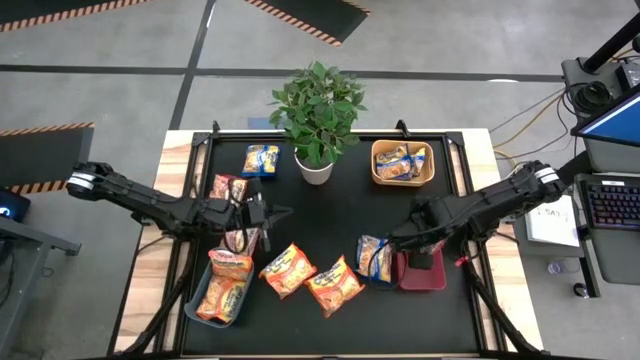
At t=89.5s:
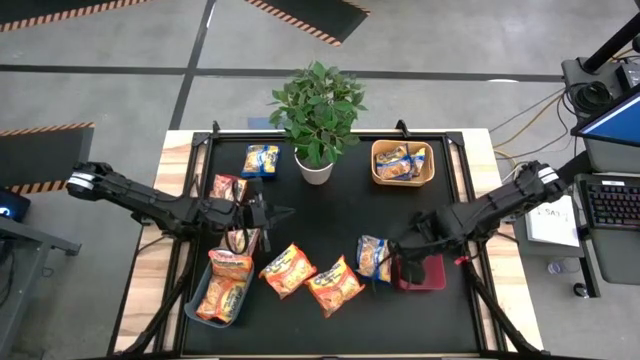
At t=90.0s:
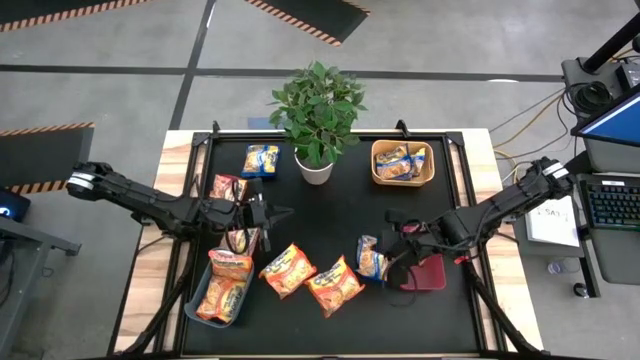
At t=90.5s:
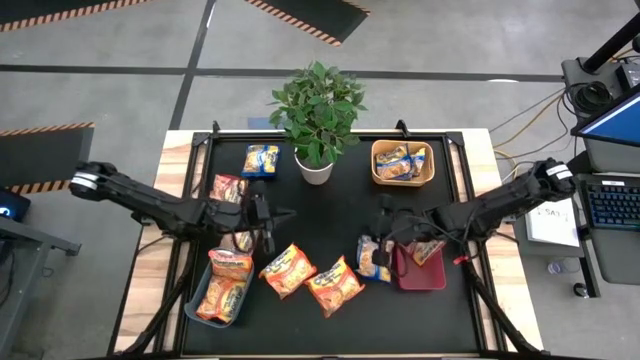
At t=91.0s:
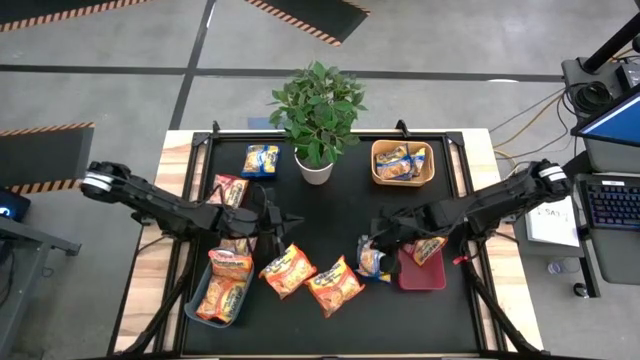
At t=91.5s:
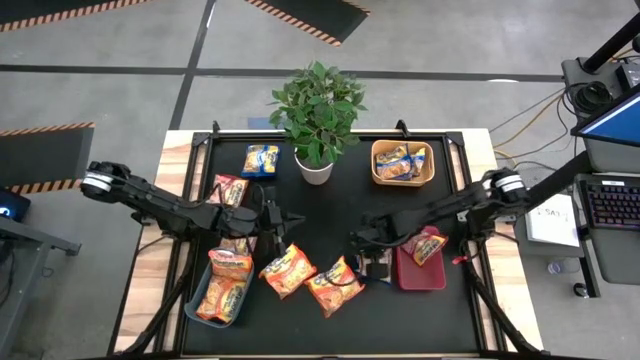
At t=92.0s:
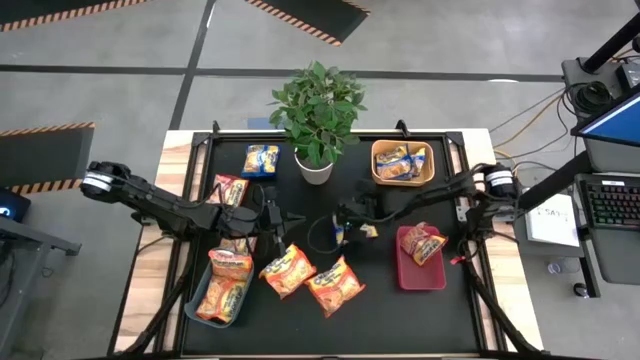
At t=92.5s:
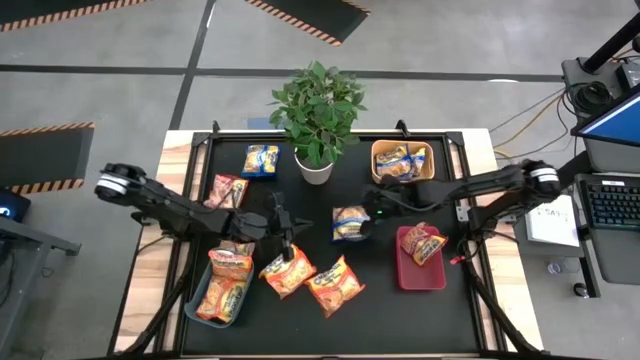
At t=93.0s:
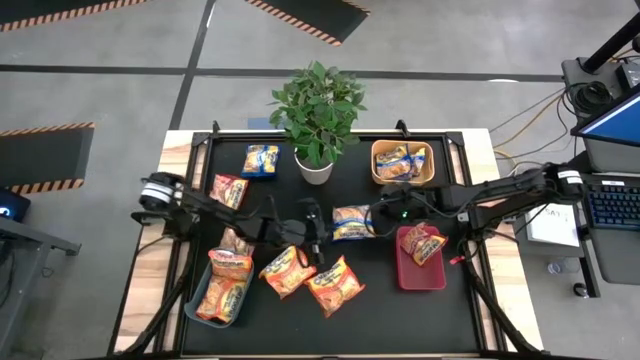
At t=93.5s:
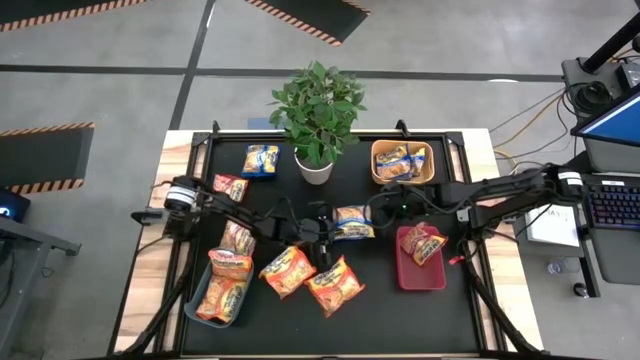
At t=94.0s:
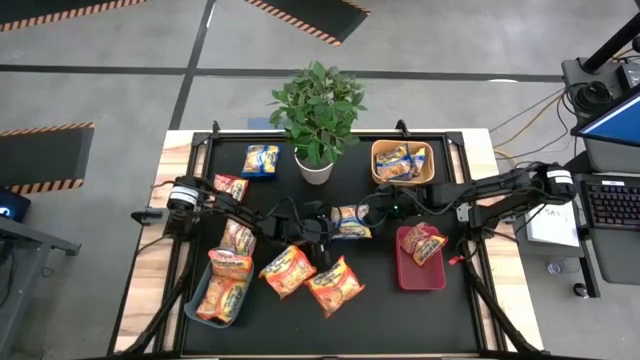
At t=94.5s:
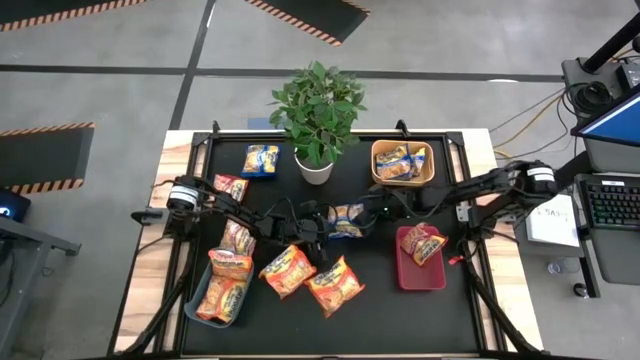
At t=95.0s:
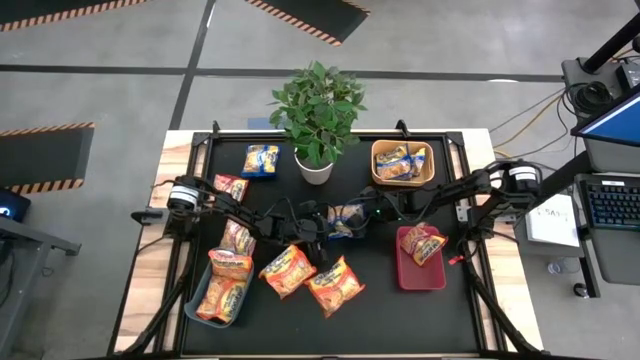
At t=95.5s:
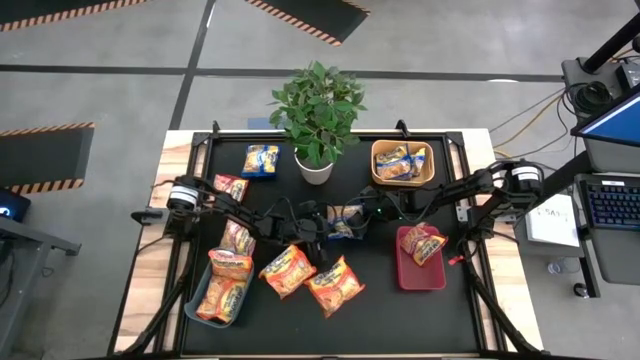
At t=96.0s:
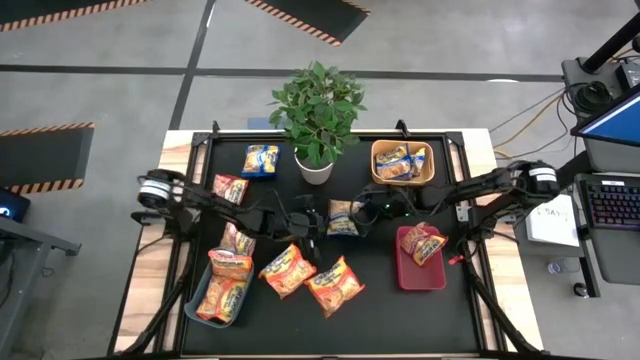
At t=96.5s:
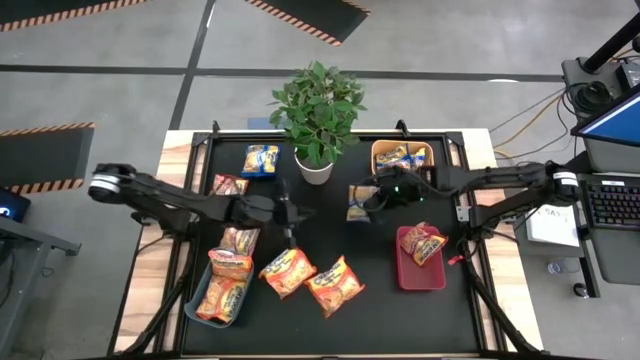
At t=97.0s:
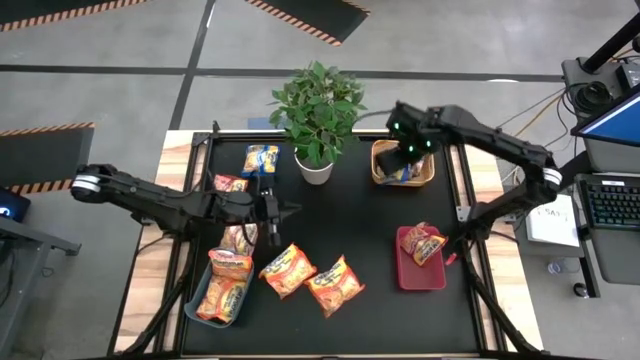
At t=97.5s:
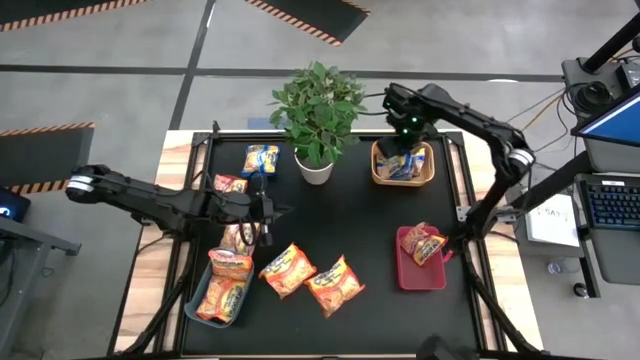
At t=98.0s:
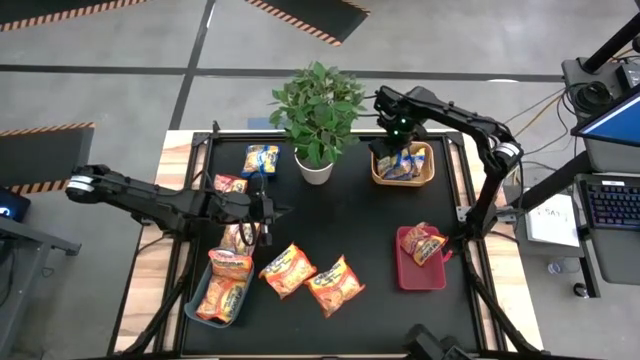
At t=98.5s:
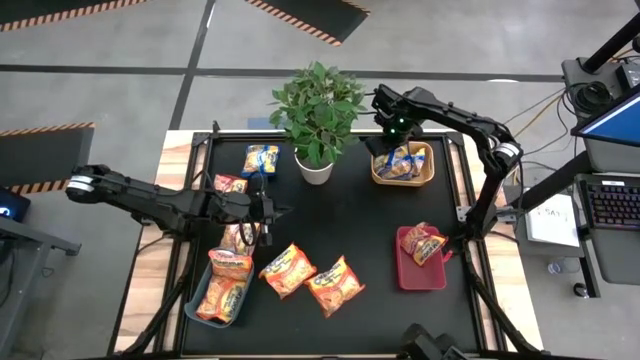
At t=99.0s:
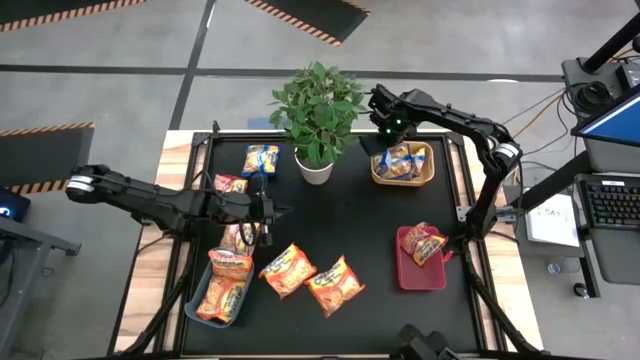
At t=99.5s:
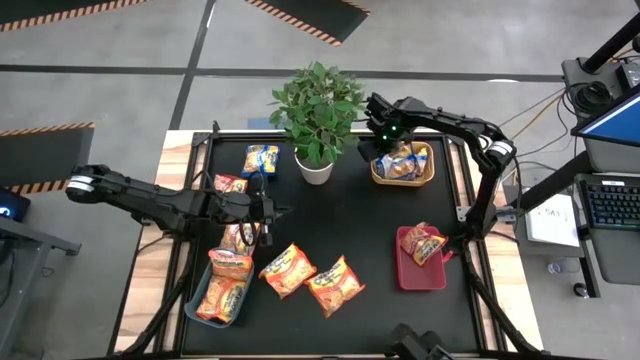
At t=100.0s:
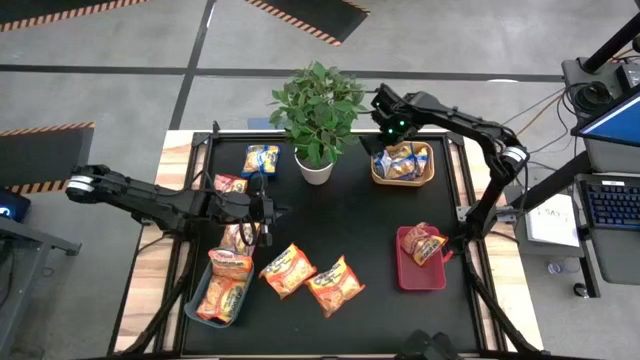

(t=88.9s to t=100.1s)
Task: Sort Maruchan noodles
Put the blue noodle pack into the pink bin

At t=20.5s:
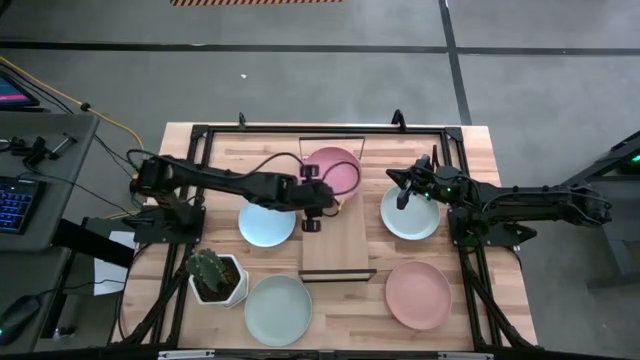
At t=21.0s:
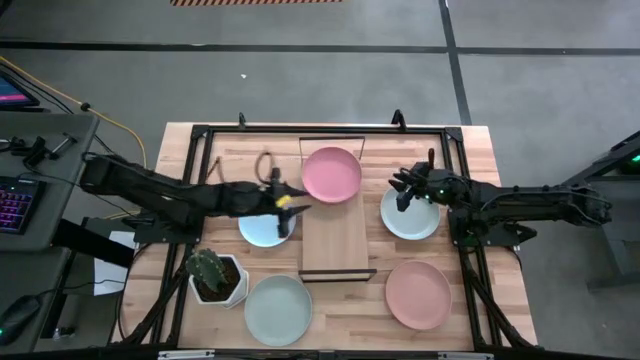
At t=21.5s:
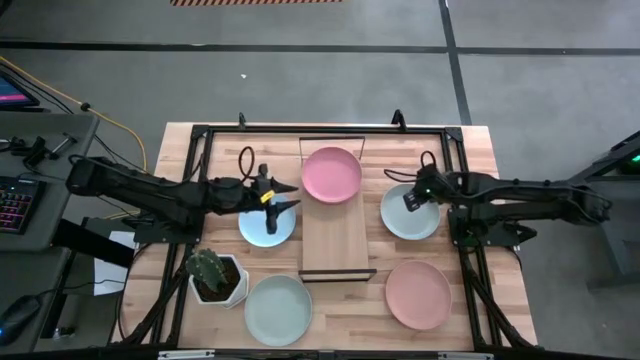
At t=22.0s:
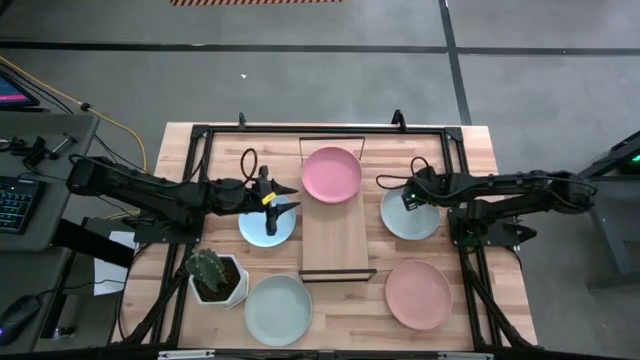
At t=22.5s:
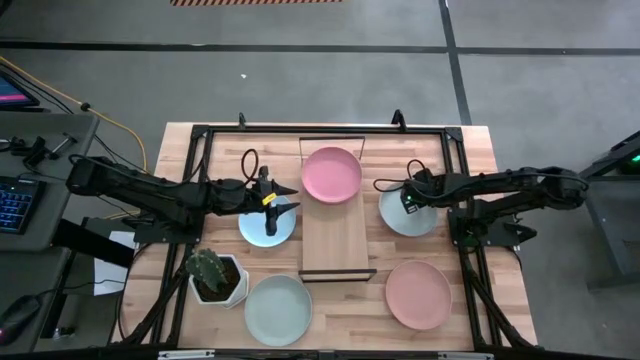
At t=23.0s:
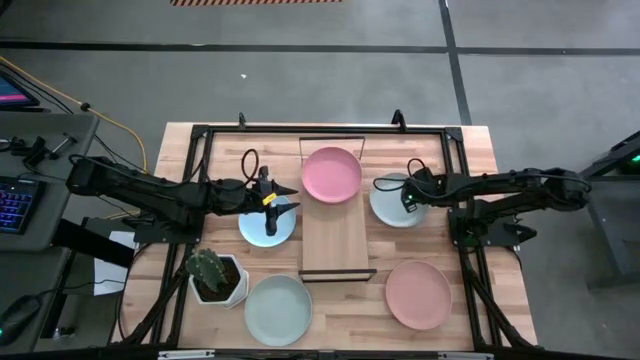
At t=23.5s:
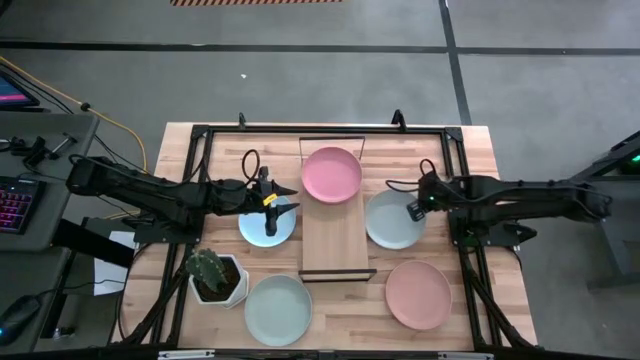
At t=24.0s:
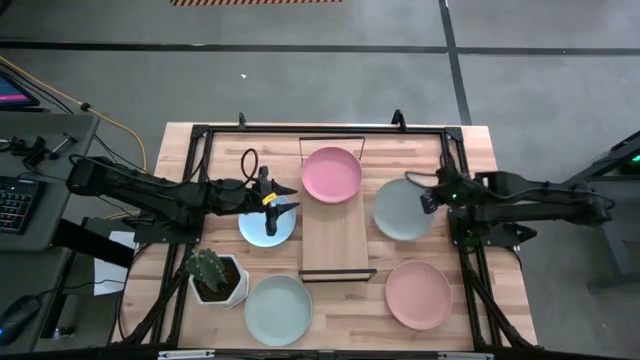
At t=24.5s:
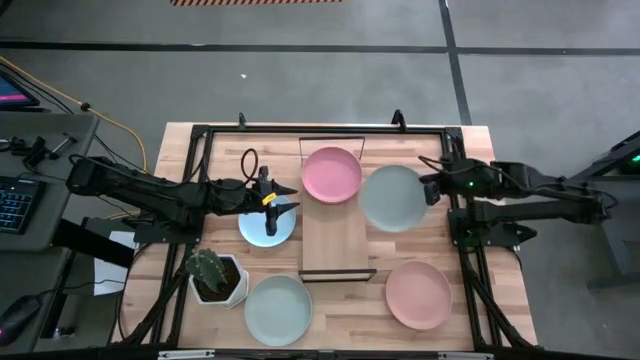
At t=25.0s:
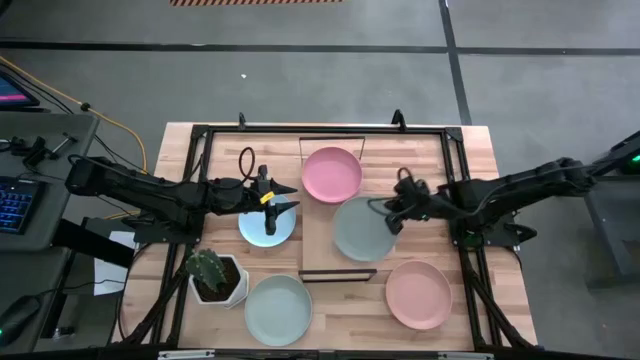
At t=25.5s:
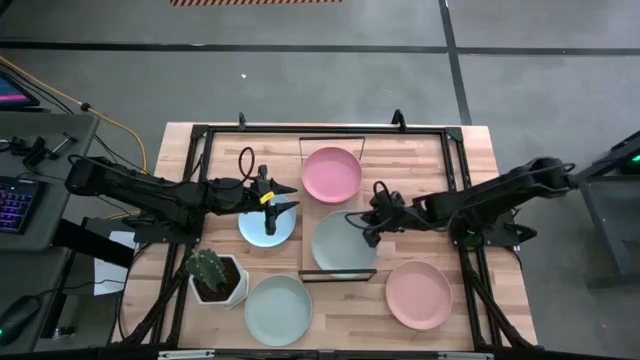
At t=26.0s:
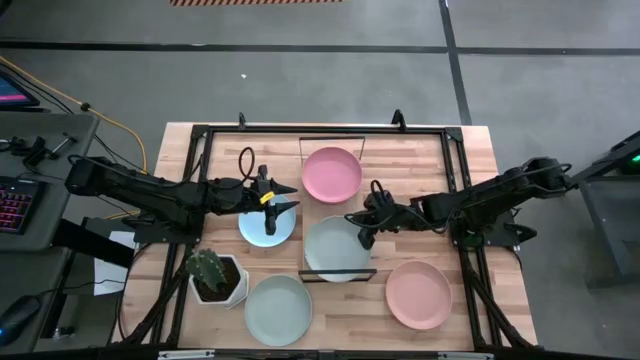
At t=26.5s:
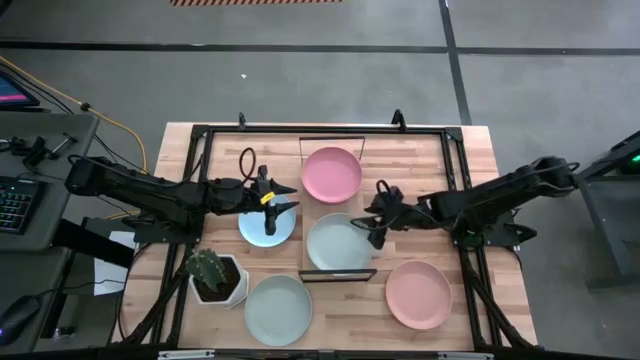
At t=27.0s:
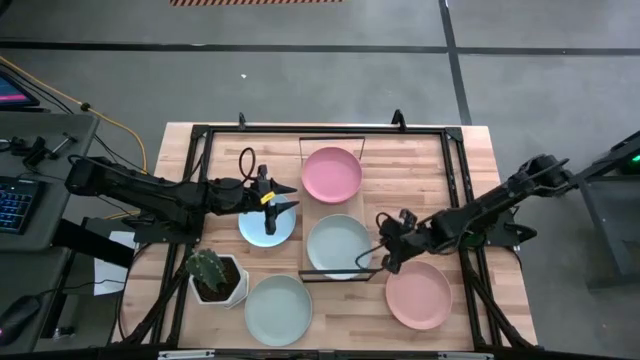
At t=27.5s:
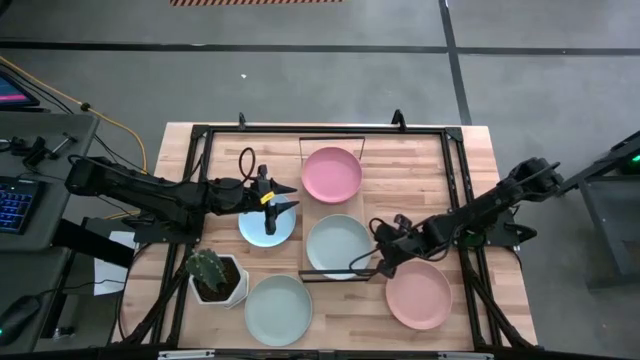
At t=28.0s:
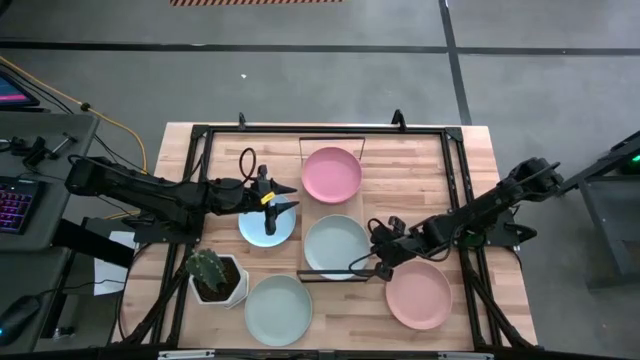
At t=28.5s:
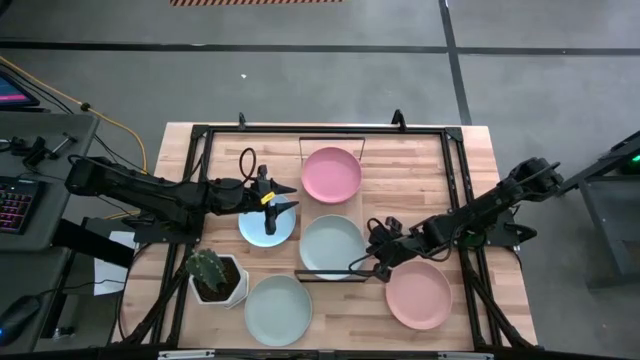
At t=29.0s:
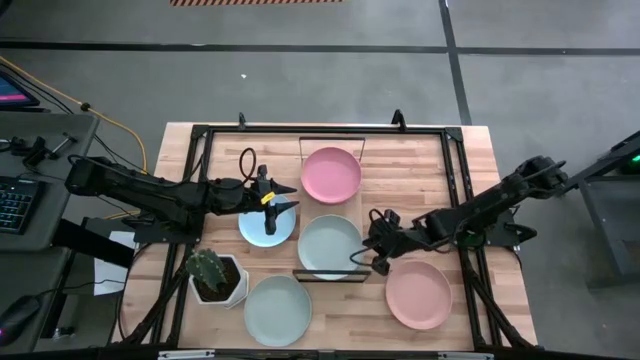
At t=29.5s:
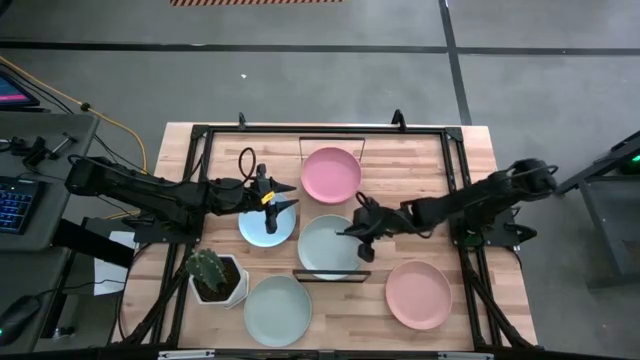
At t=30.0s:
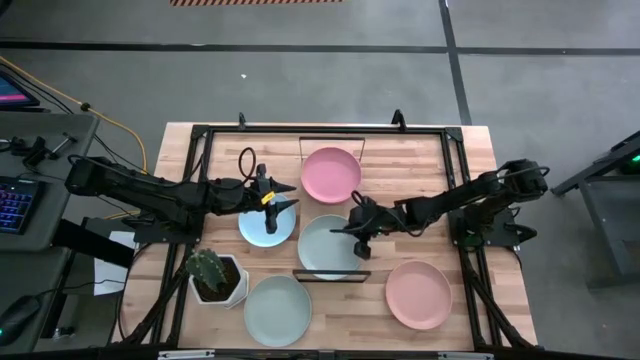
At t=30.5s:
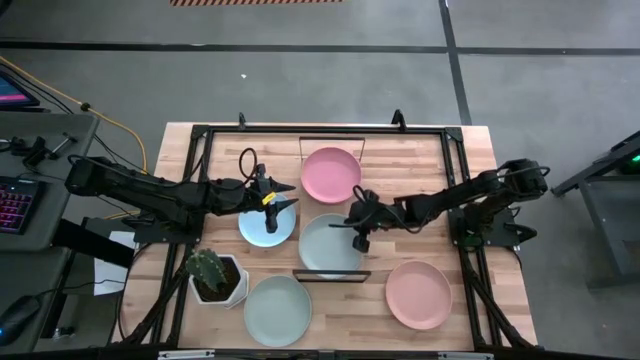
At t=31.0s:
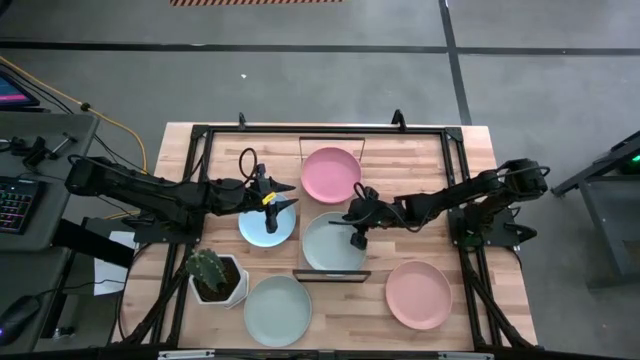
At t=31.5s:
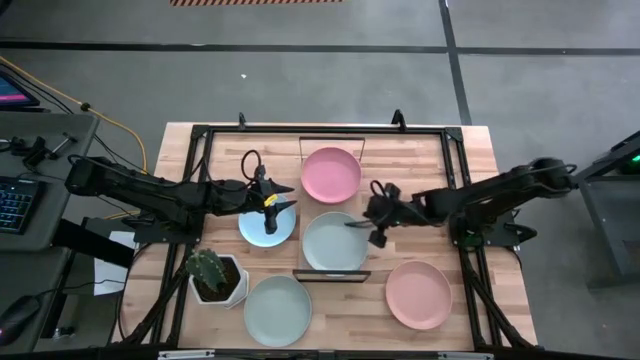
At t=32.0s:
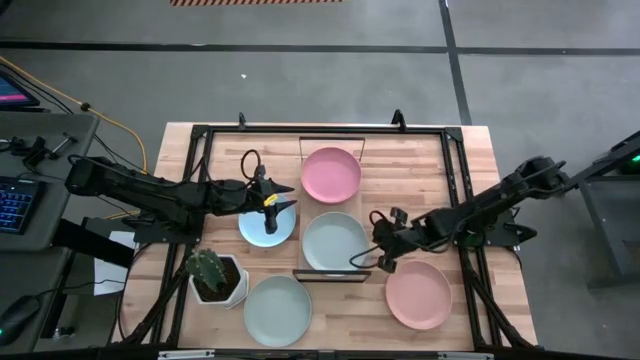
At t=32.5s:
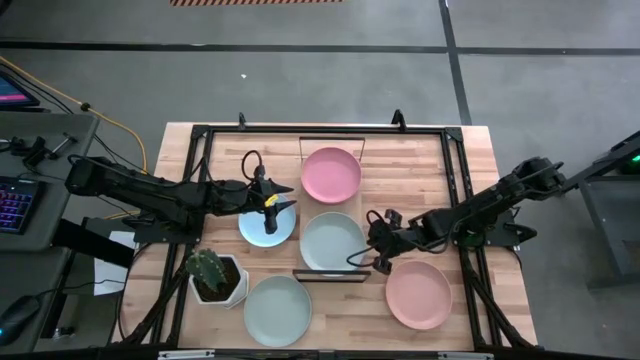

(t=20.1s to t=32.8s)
Task: Place and stack plates onto a shelf
Put the top gray plate on the shelf
